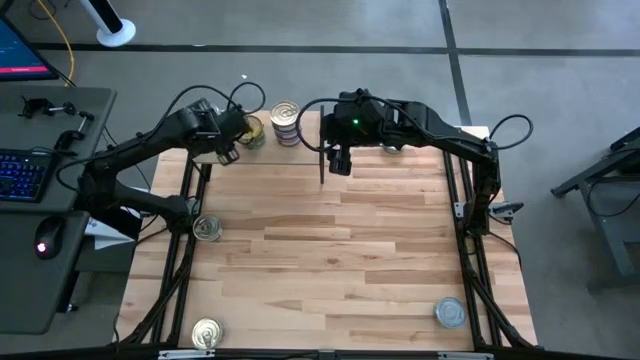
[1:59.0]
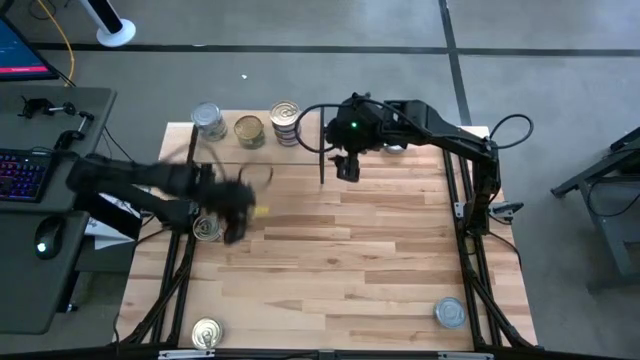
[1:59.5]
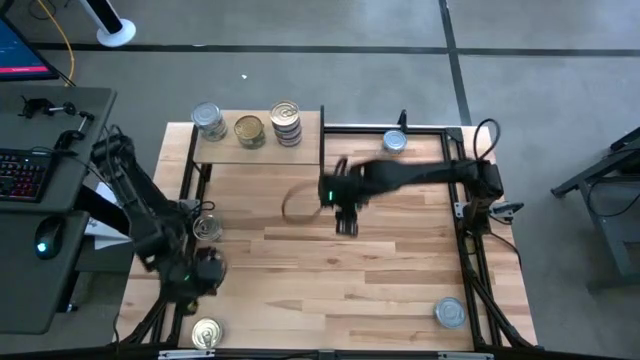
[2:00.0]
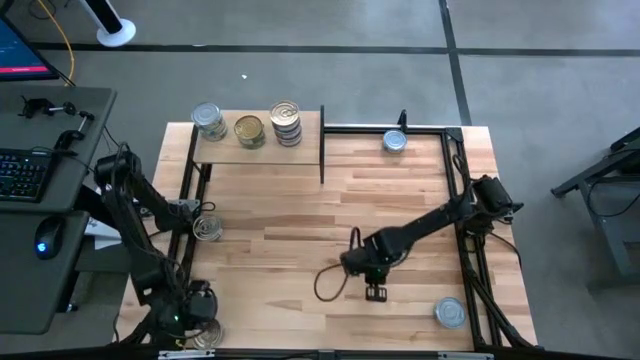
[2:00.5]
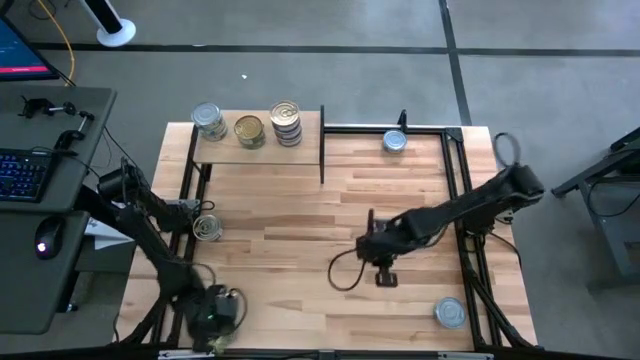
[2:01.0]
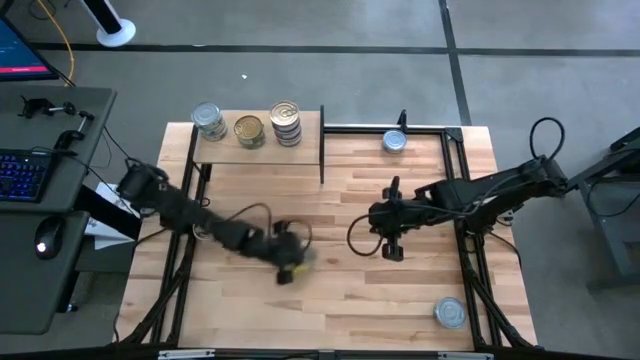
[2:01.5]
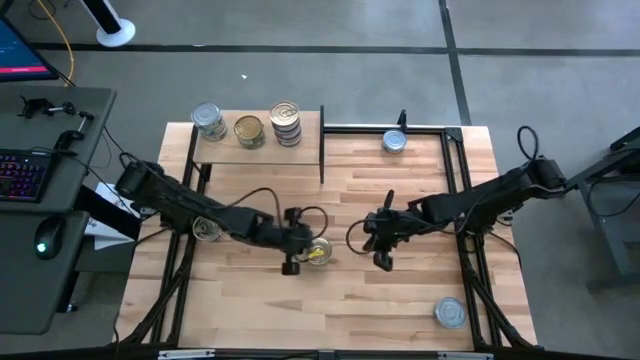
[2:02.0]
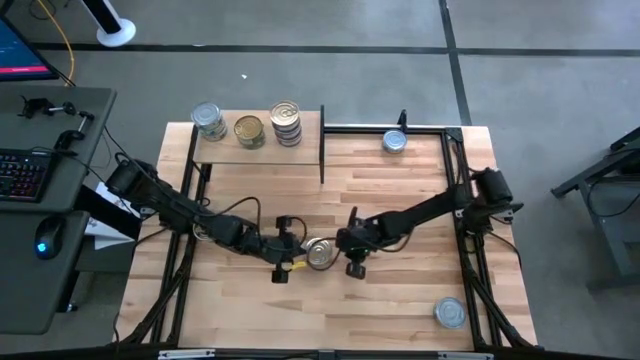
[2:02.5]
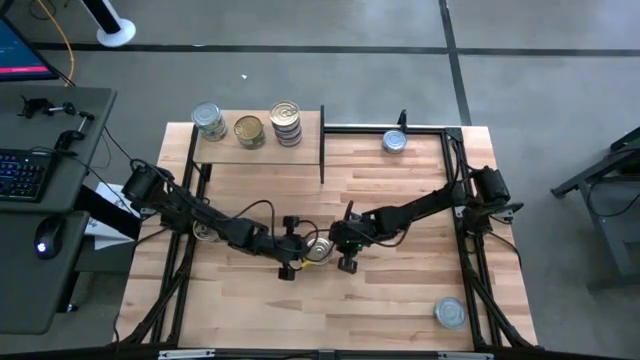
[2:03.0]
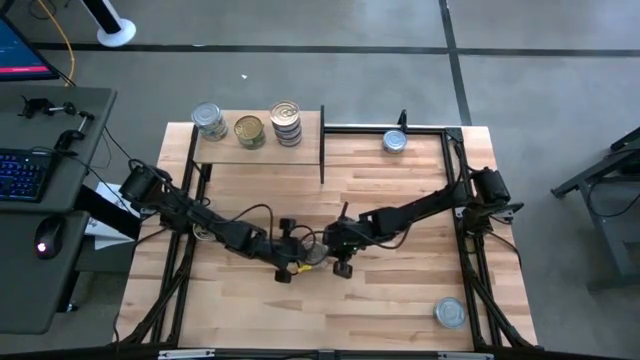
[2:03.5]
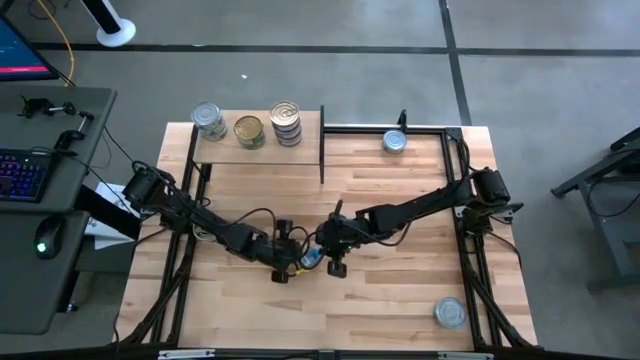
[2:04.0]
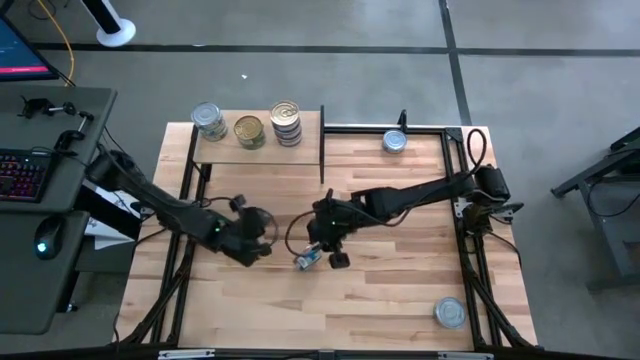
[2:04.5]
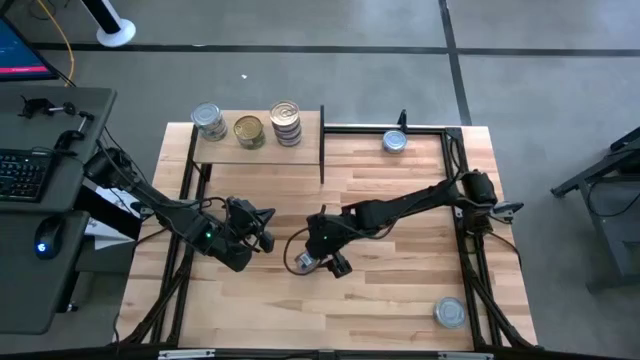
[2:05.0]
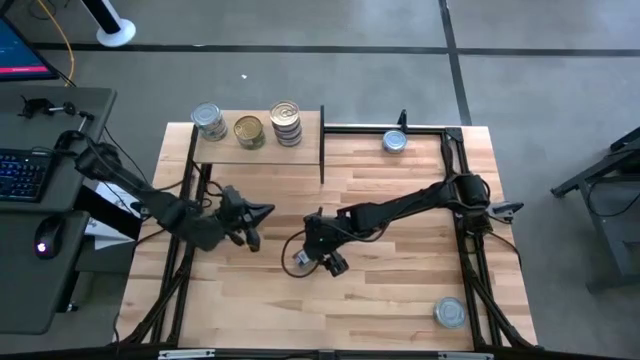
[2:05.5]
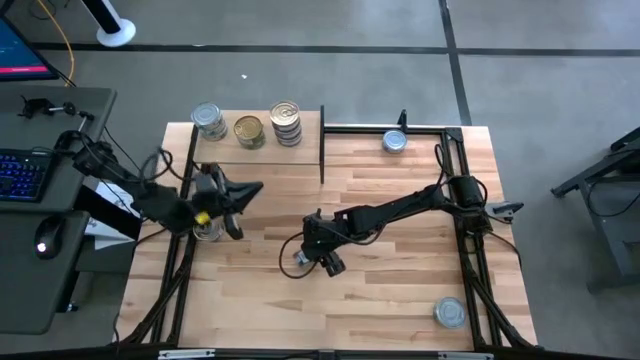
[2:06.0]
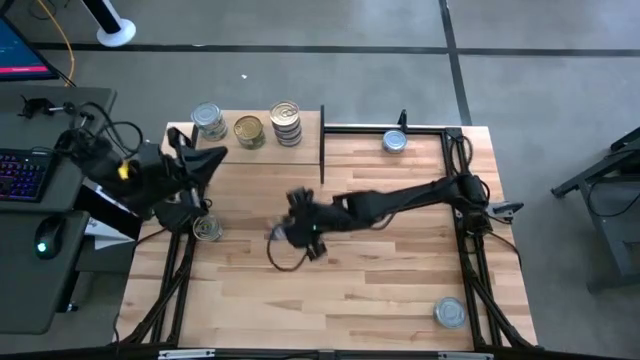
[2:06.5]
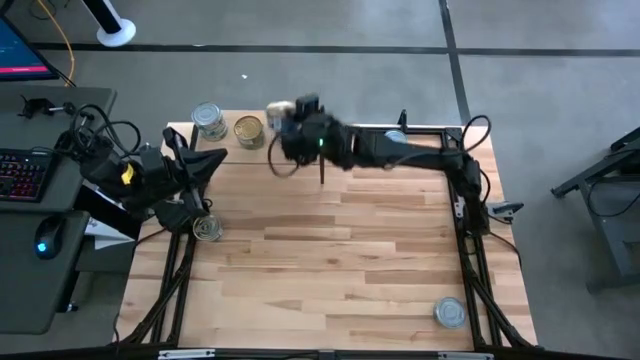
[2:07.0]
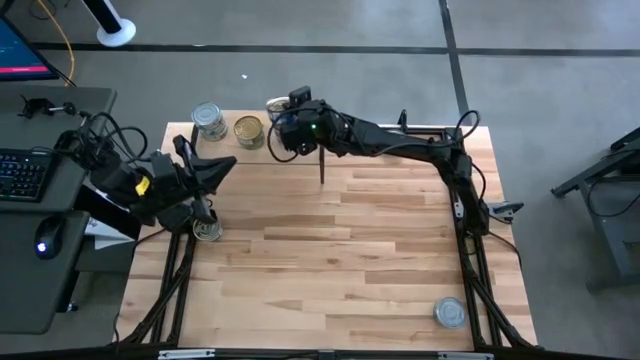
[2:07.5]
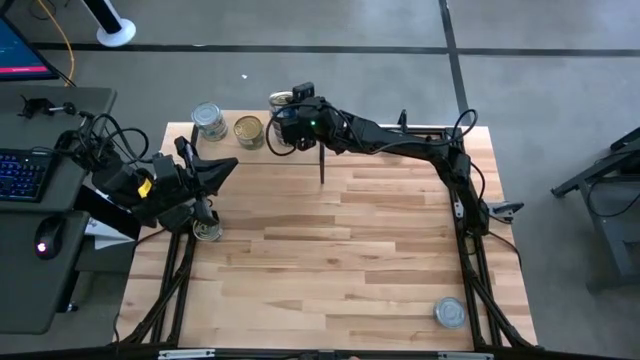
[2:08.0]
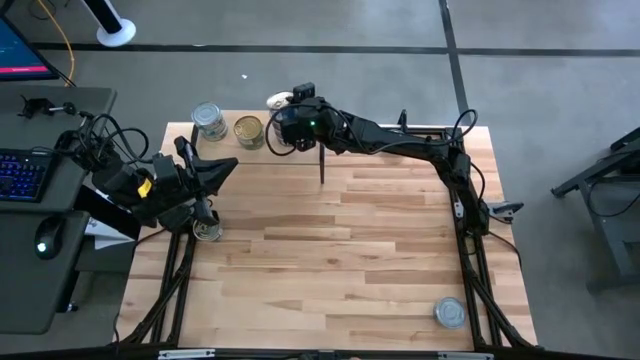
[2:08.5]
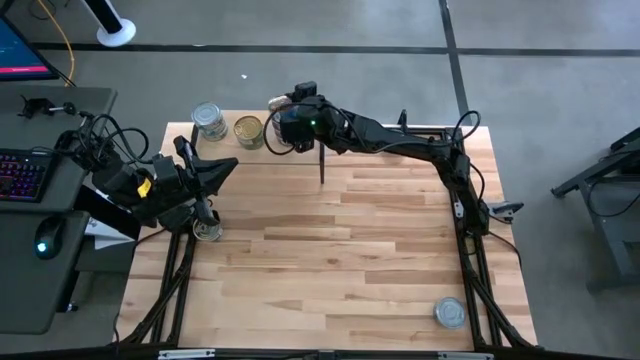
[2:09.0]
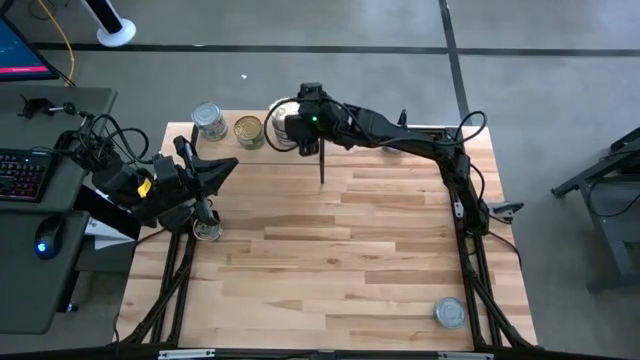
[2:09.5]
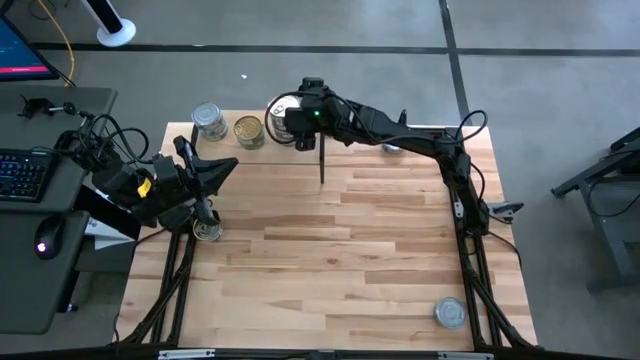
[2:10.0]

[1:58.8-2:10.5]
Task: Stack canned seafood by type on shelf
Stack the blue-pink tuna can on top of the blue-pink tuna cans on the shelf

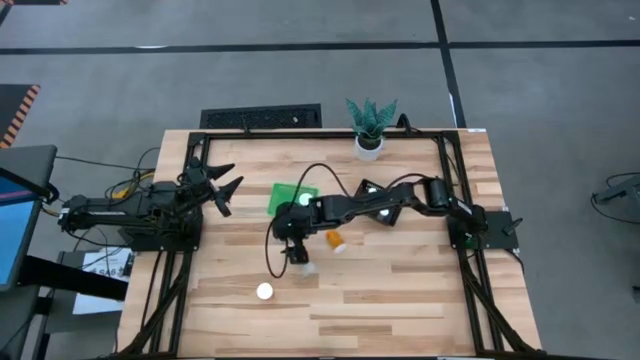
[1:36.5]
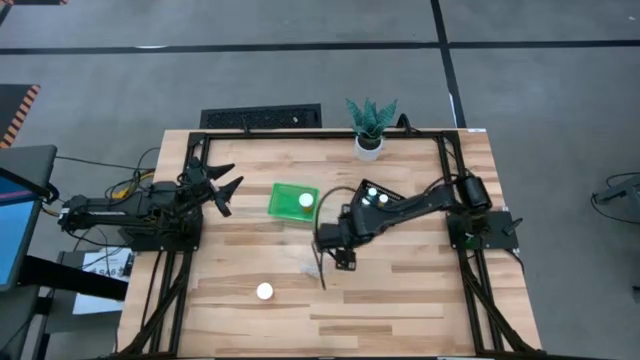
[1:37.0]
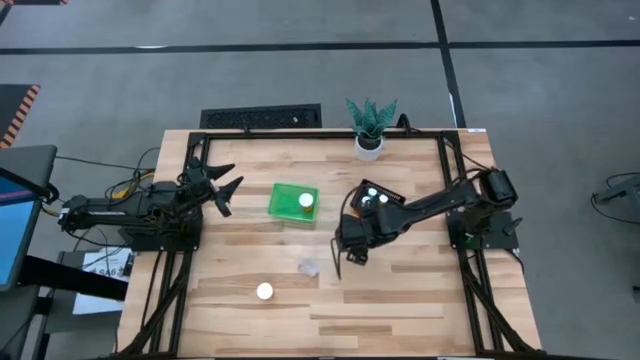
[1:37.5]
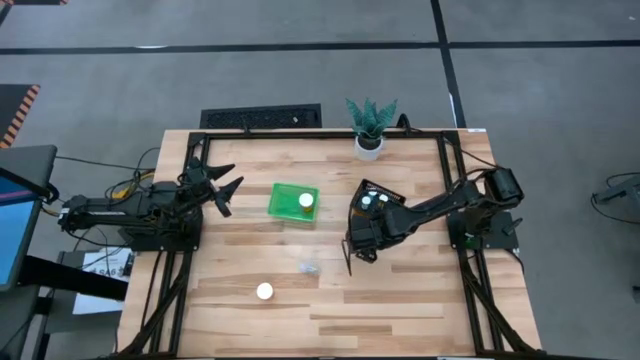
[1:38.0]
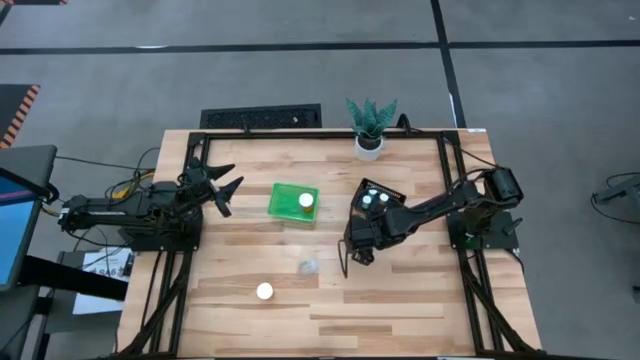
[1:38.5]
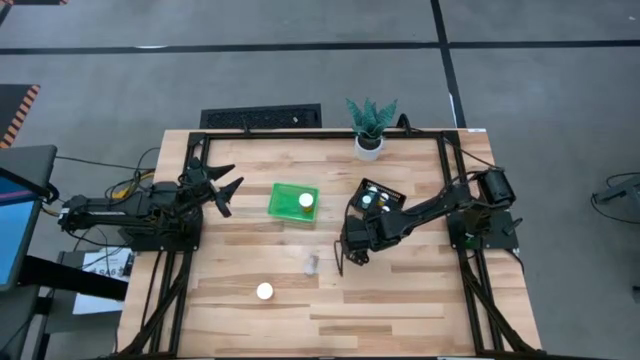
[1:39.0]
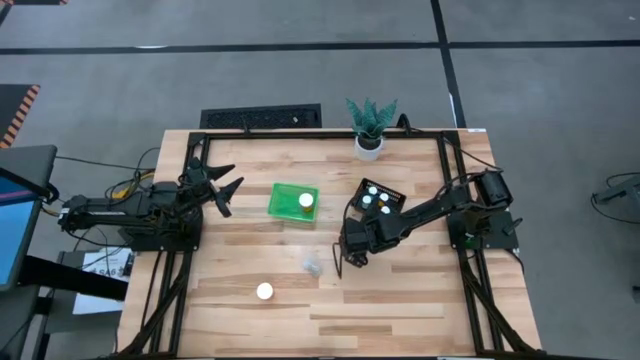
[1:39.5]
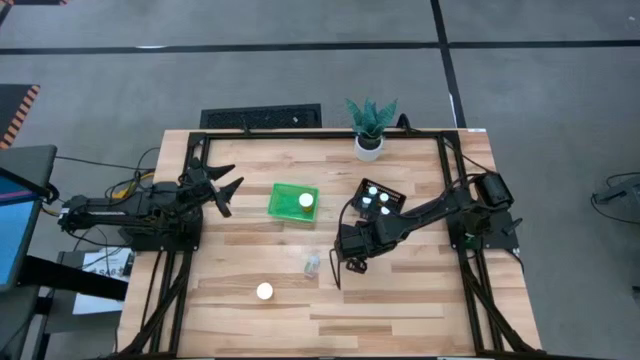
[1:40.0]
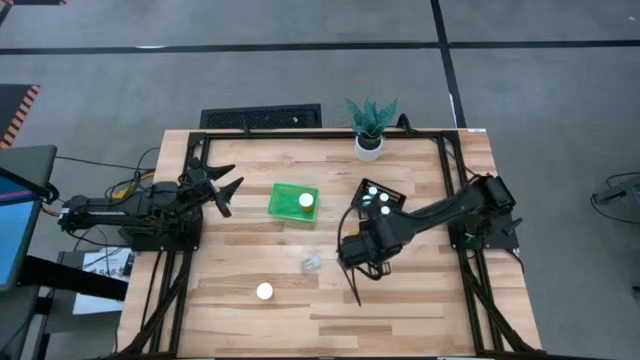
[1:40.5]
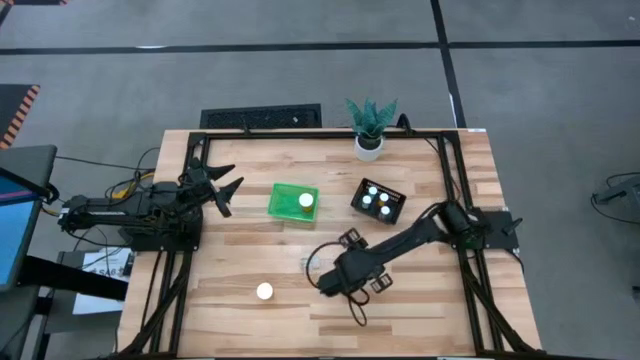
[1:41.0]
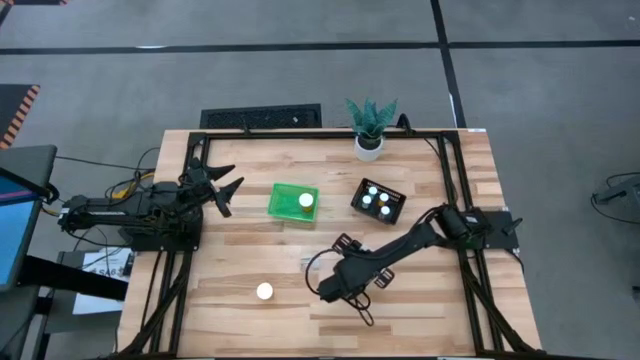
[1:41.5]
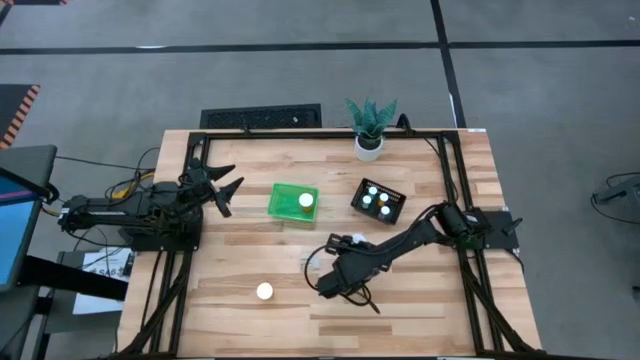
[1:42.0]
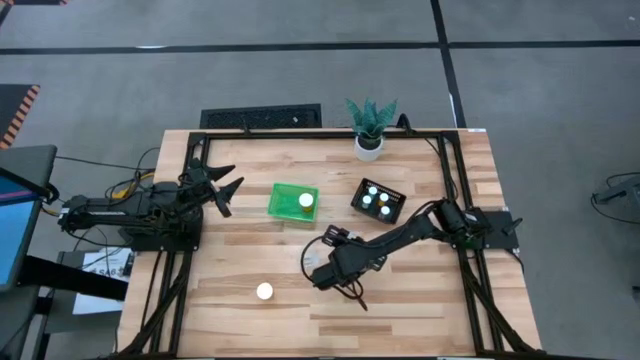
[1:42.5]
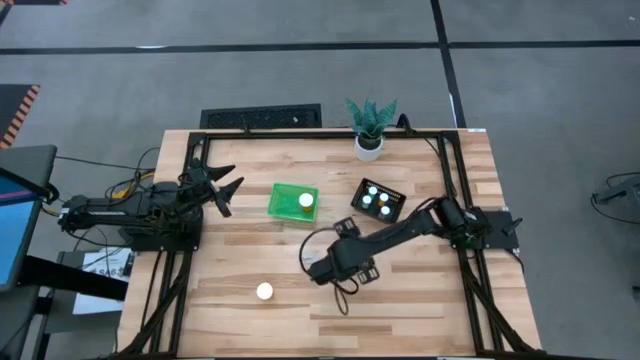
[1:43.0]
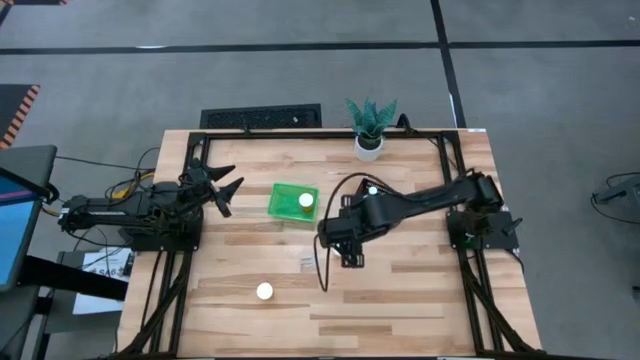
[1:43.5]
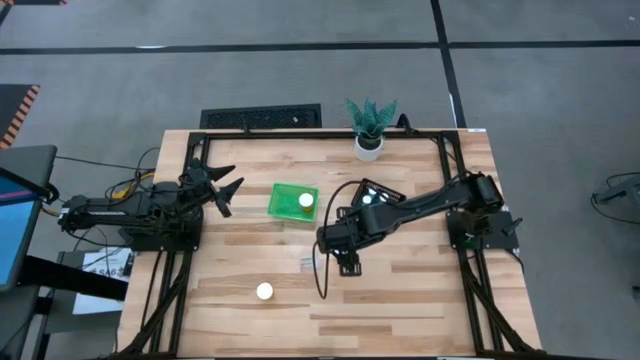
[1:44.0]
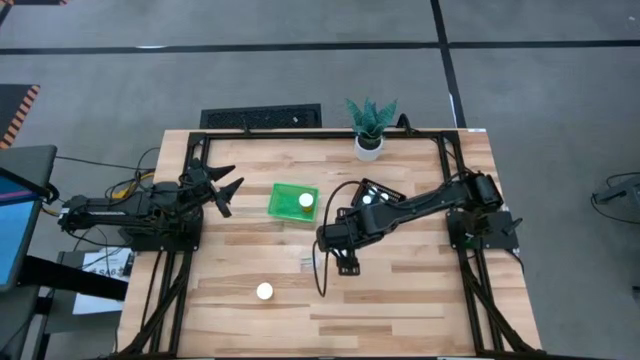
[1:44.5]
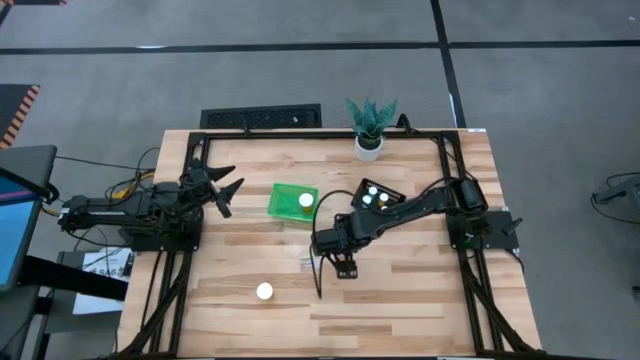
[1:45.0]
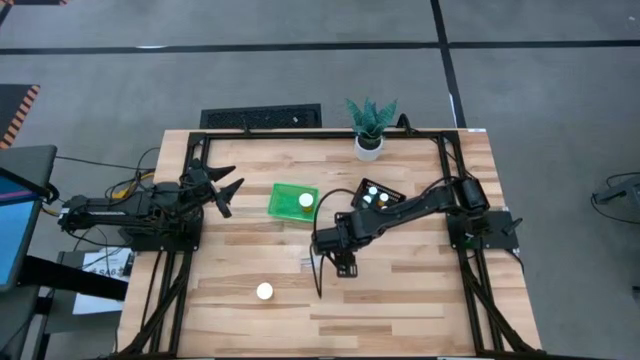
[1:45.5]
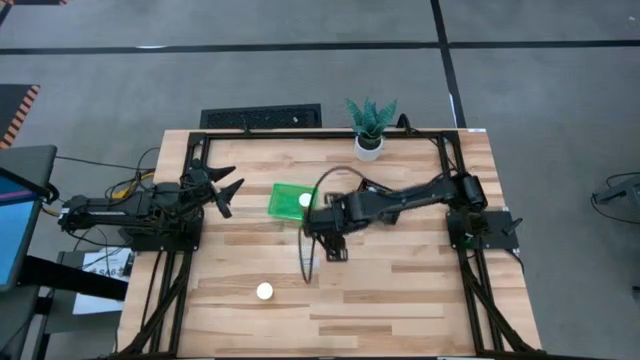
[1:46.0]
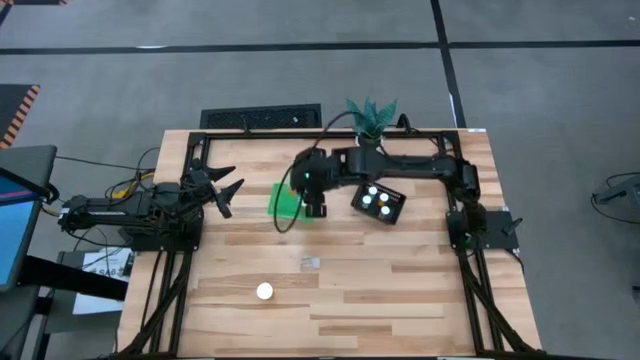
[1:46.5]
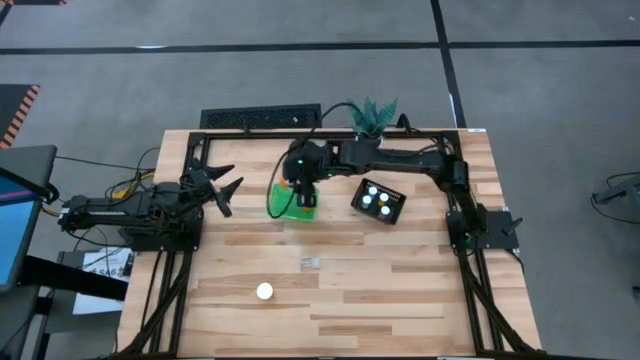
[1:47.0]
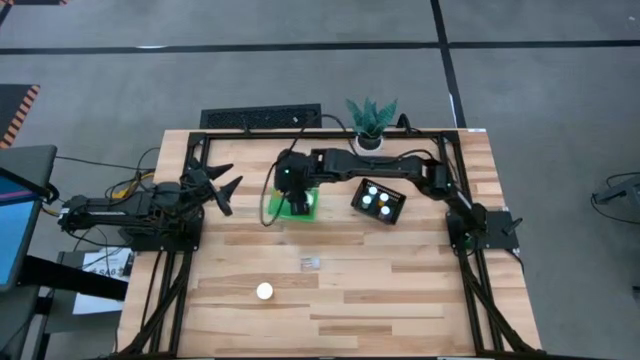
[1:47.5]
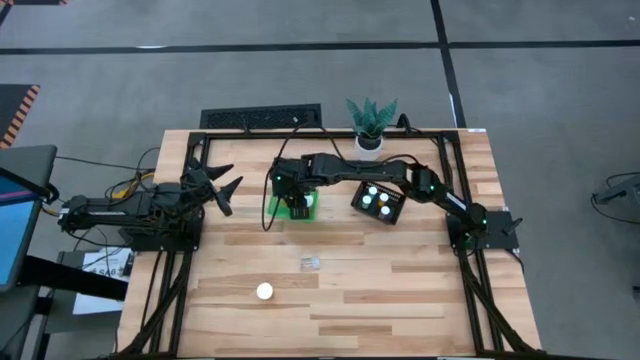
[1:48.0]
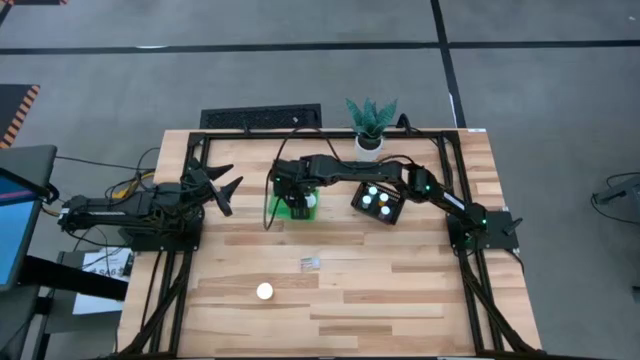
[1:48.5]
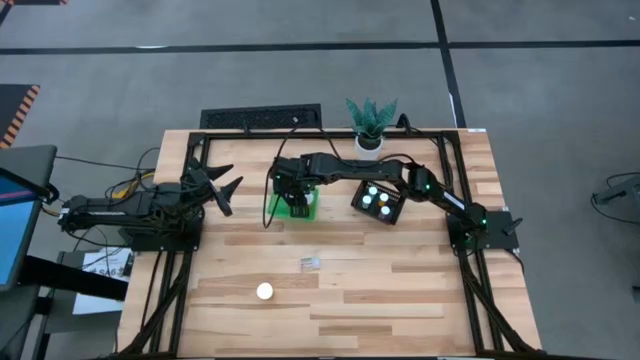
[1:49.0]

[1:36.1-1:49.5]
Task: Pick and place medicine bottles into bin by pill shape (circle, oval)
Put the right orange capsule bottle into the green basket
